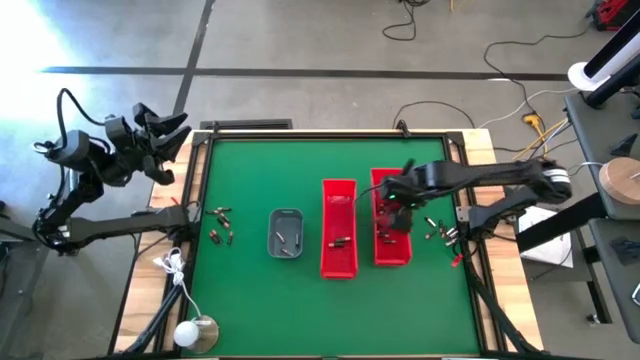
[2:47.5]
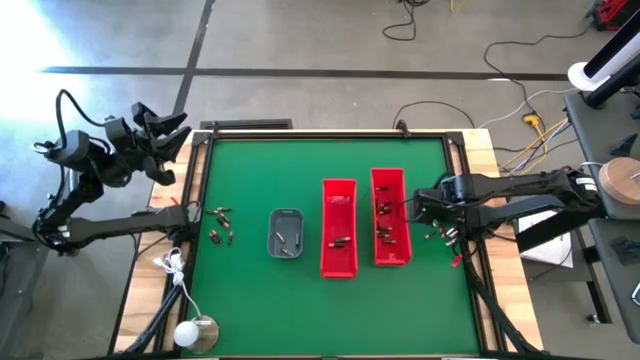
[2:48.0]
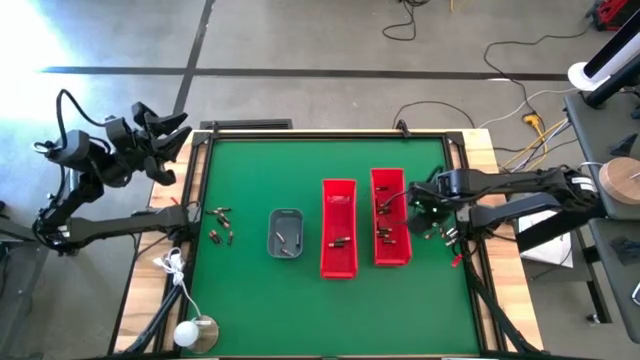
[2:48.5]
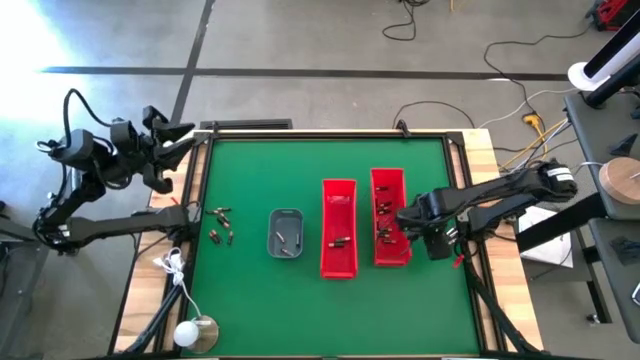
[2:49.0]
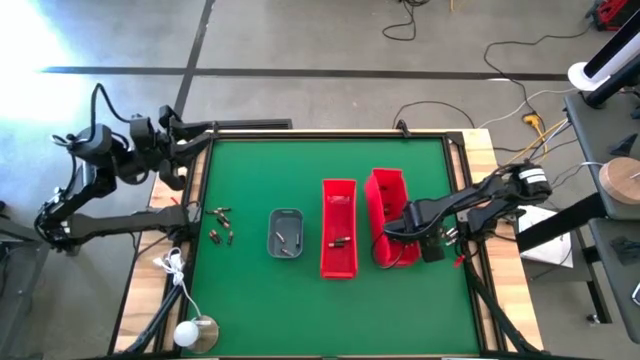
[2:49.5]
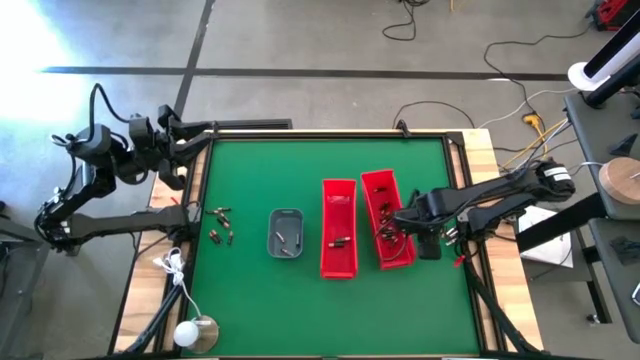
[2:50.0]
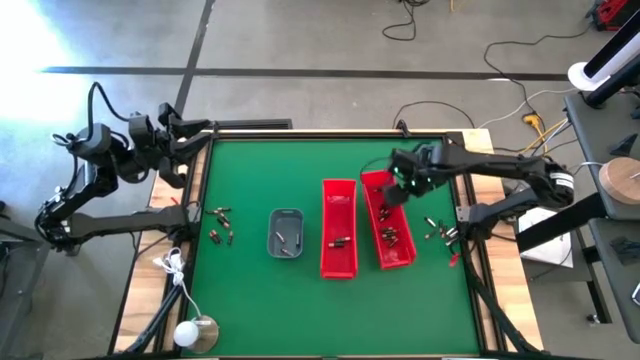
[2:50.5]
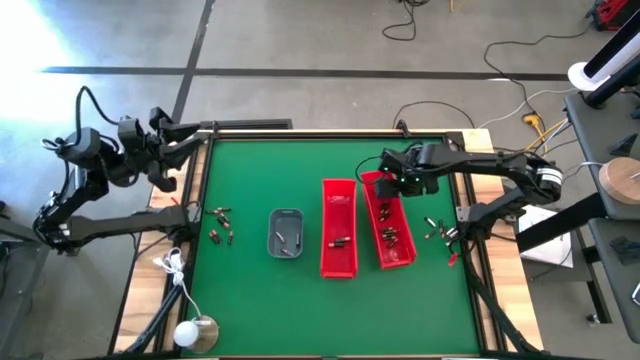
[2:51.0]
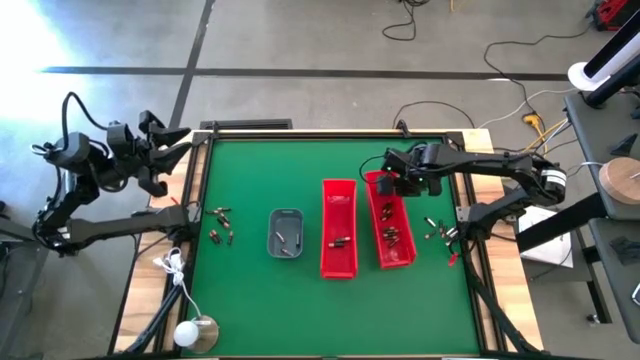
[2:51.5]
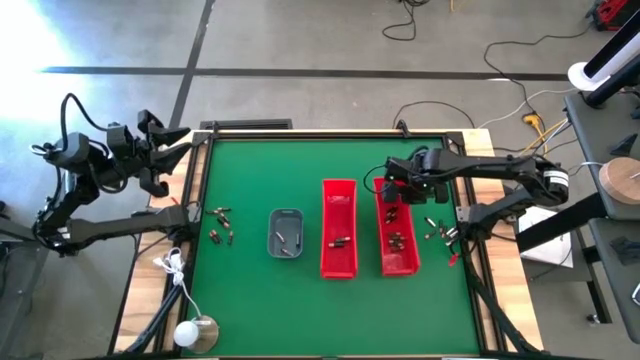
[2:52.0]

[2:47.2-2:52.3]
Task: Sort batteries
Adjust the right red bin on the table

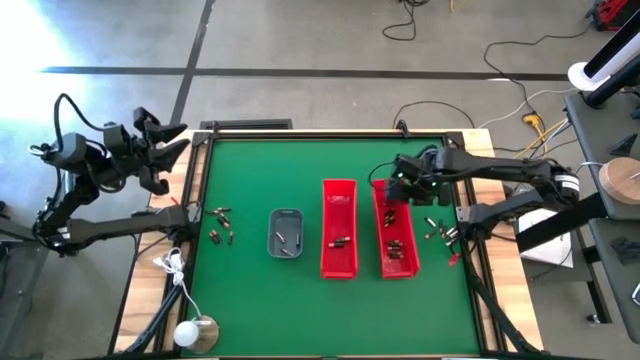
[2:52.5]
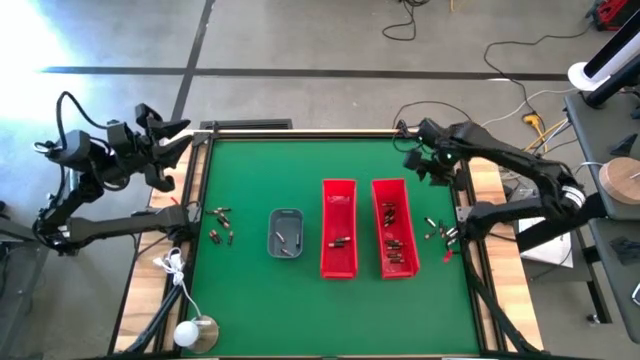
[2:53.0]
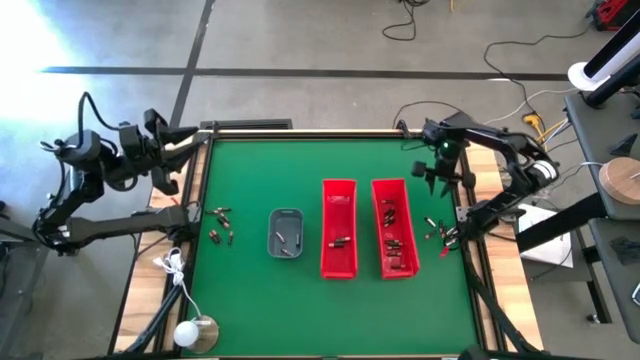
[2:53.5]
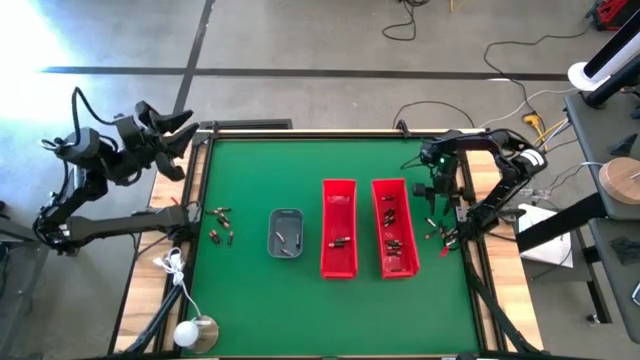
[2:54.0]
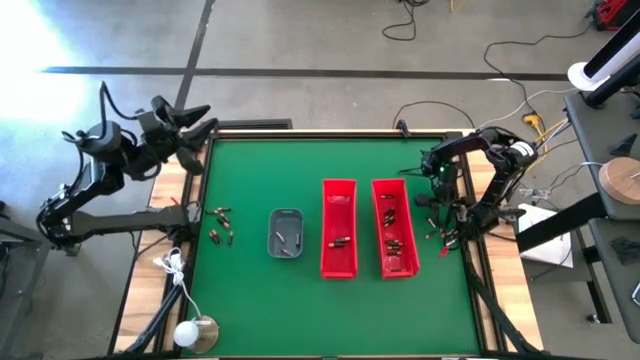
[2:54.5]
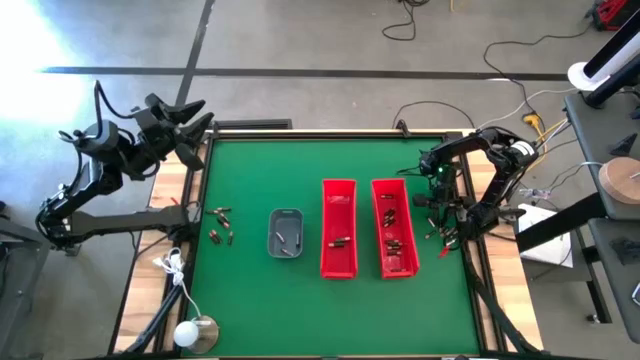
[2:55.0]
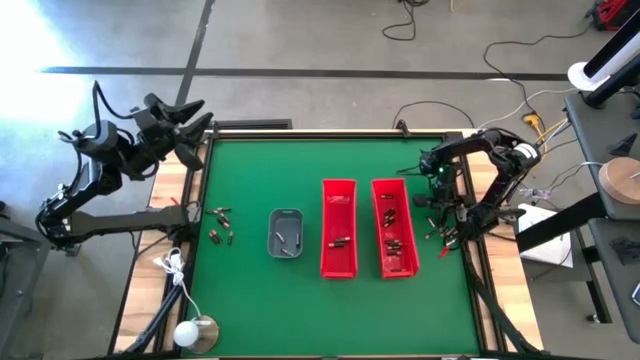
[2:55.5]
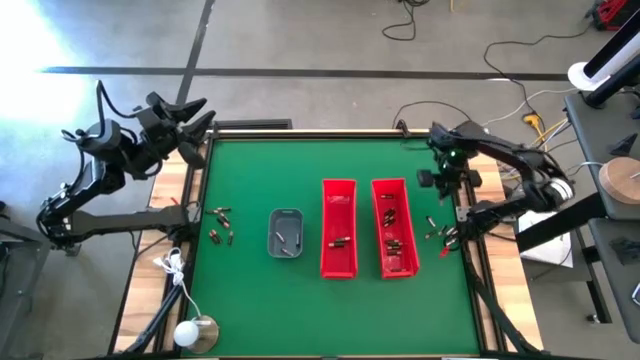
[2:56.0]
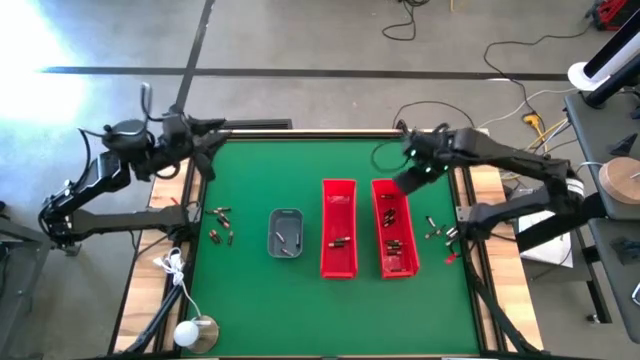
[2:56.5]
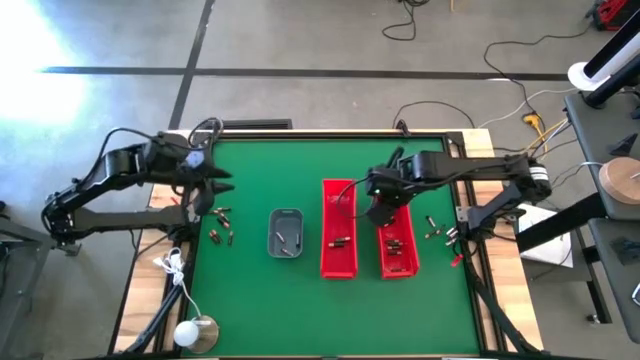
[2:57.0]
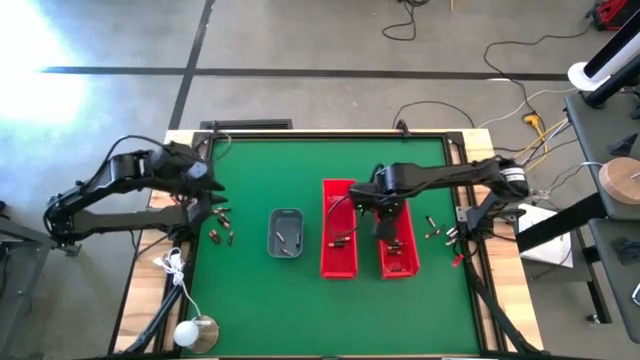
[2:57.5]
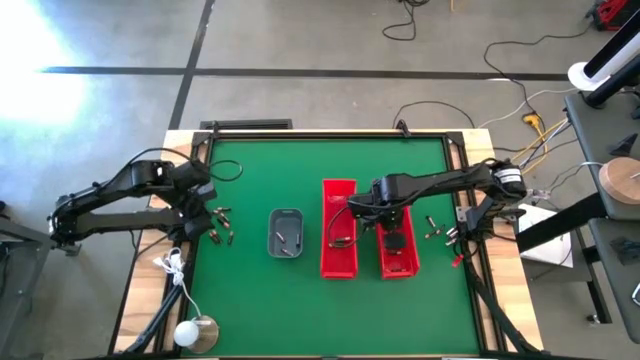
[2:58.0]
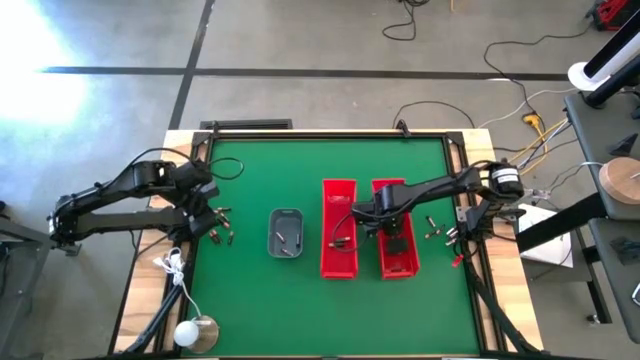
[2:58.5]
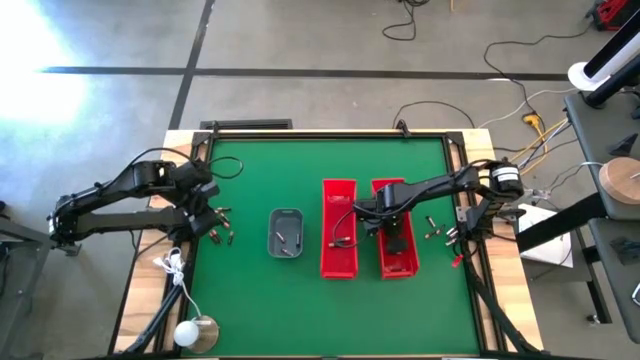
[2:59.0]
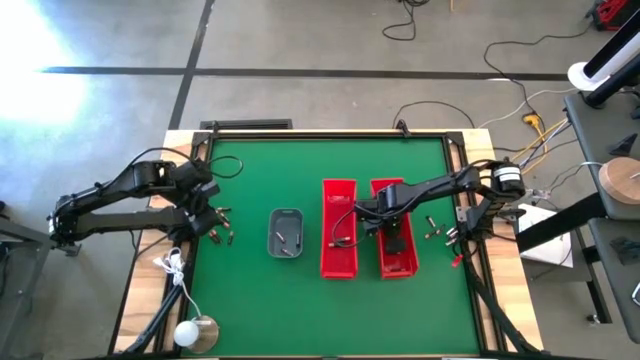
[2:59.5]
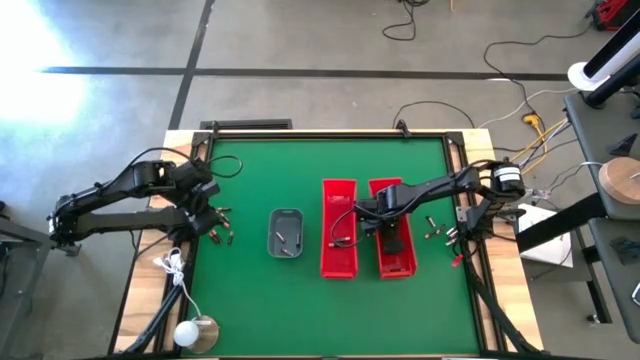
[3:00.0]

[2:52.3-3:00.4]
Put the small black battery into the right red bin

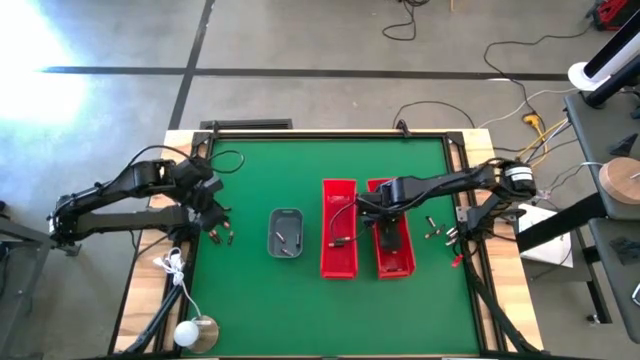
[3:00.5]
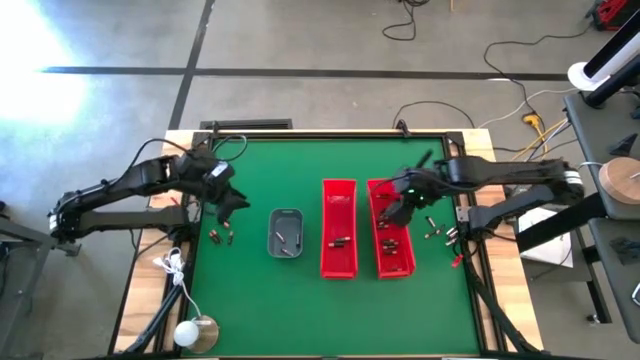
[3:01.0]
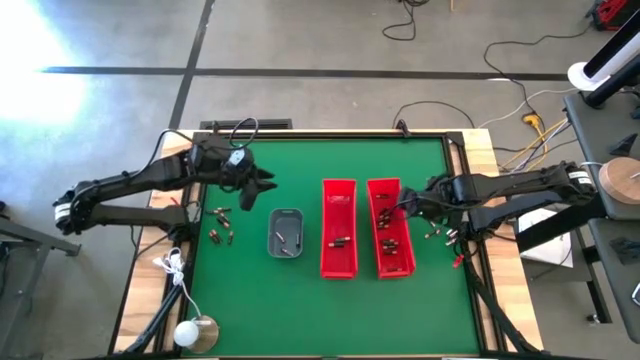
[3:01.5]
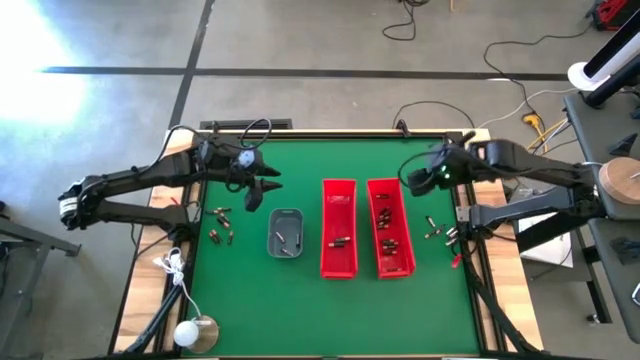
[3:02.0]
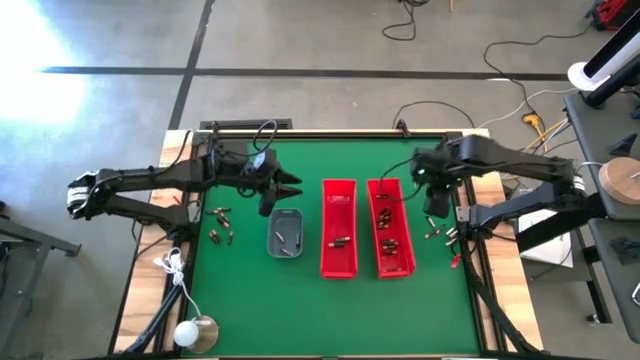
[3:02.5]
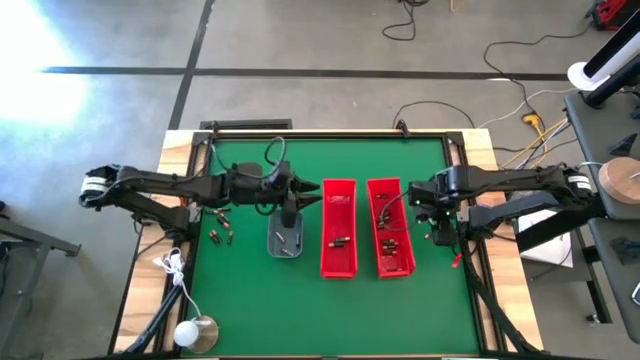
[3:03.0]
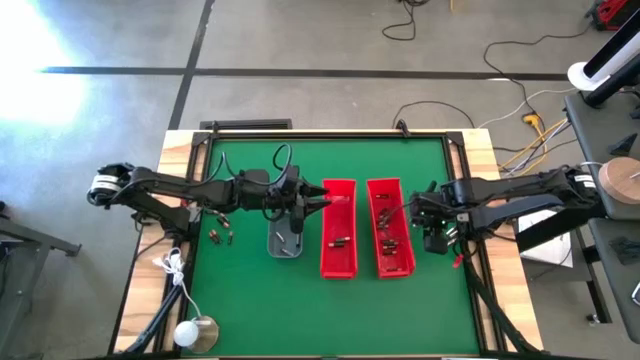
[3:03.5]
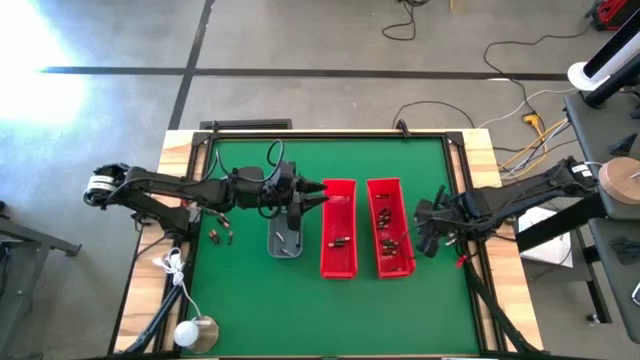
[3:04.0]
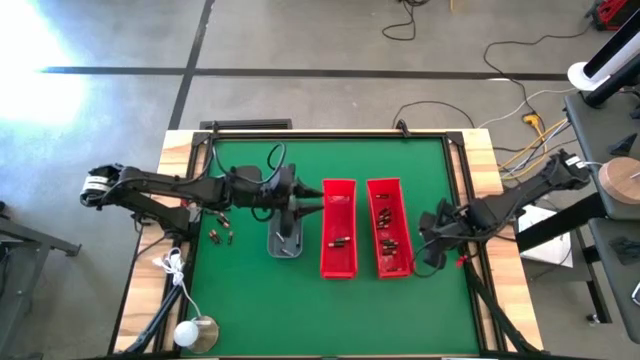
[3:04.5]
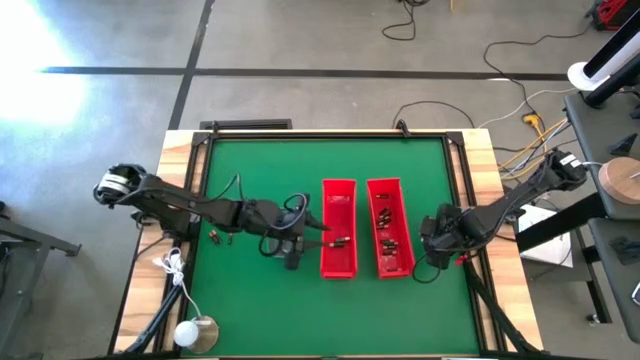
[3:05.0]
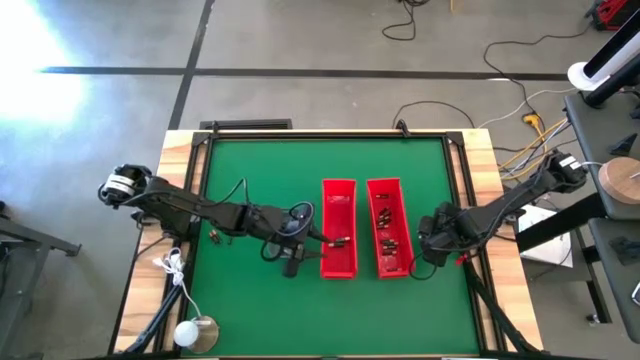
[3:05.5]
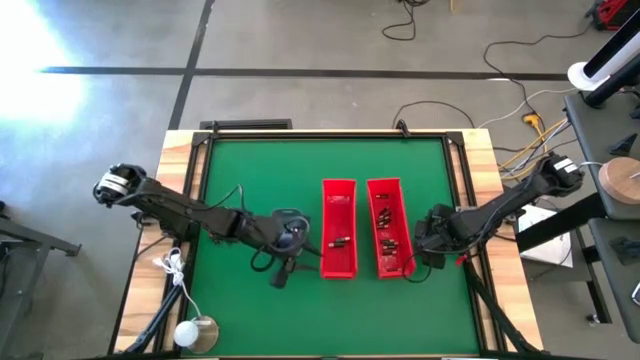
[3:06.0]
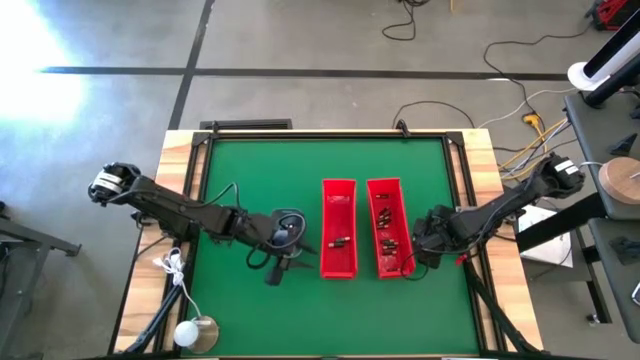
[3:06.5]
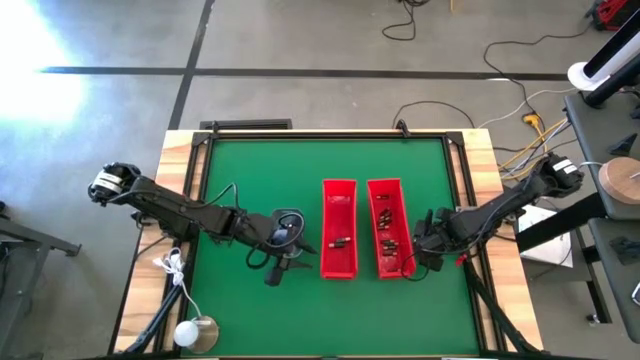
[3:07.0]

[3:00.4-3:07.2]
Put the silver battery into the gray bin

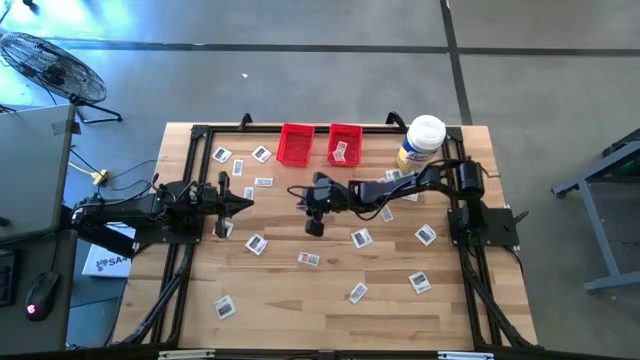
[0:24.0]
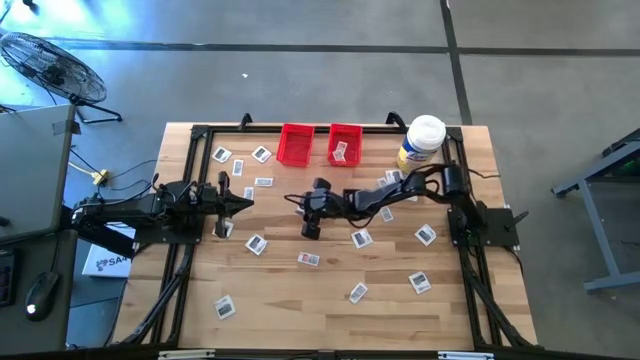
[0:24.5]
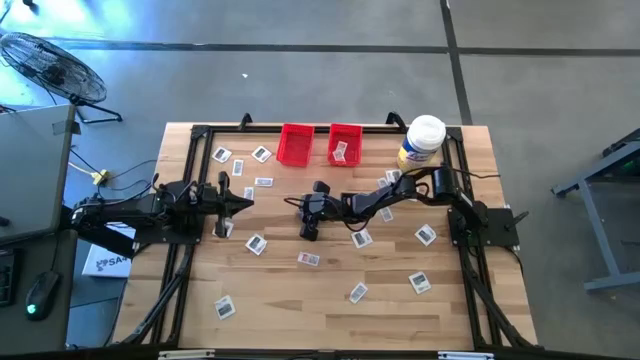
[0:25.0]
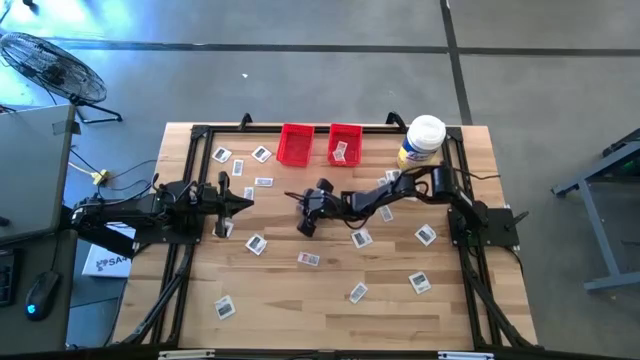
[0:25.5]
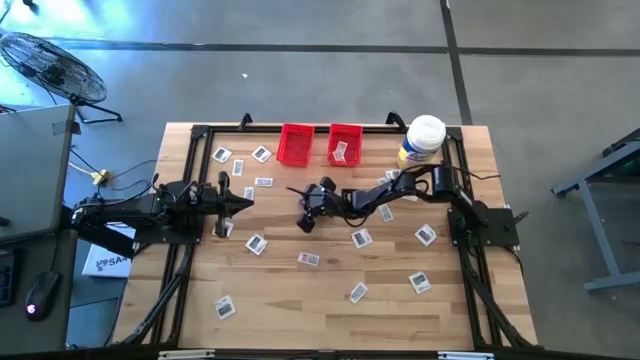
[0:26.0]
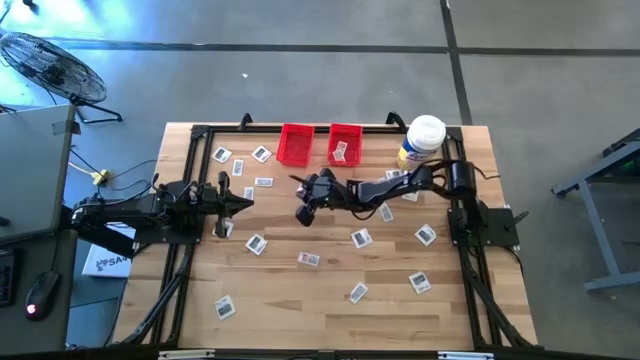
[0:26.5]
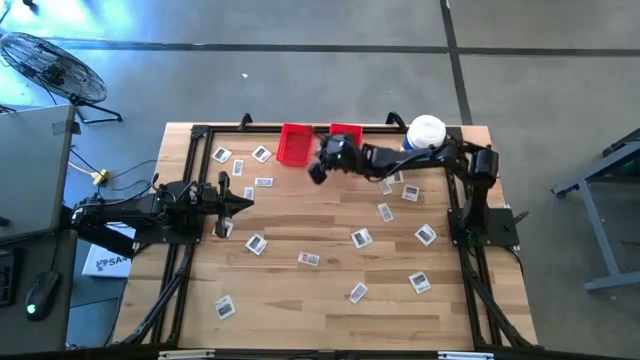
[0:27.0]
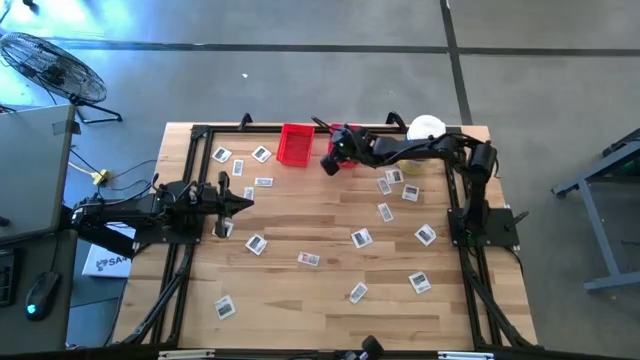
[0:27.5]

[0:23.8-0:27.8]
Task: Pick & Place First Aid Supplies
Put the ointment pack into the right red bin
